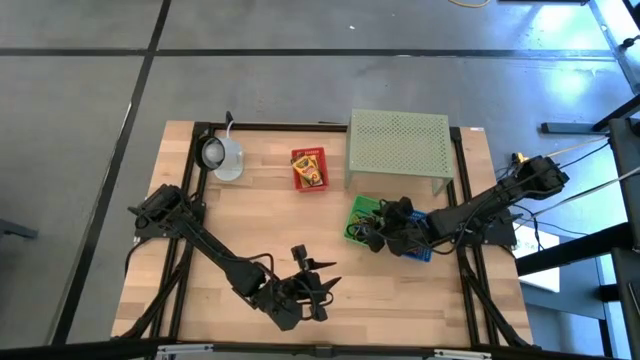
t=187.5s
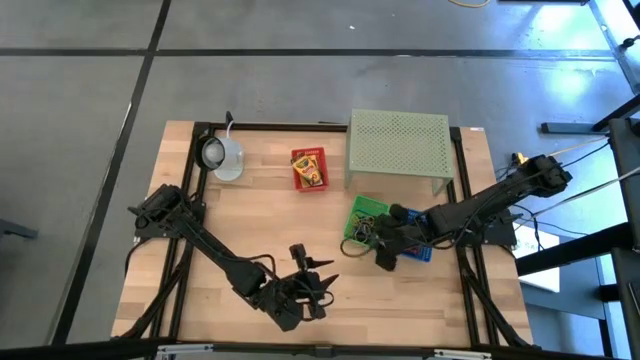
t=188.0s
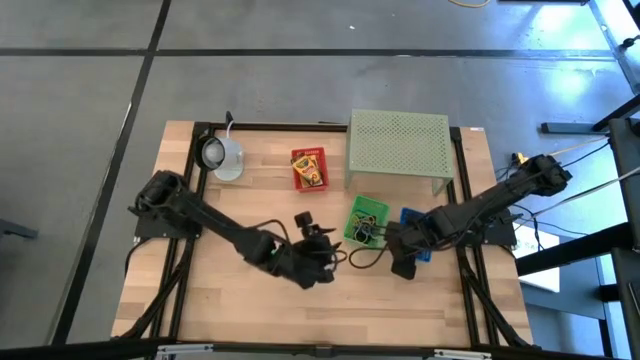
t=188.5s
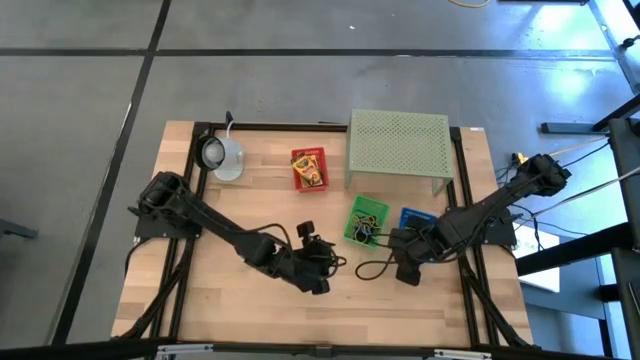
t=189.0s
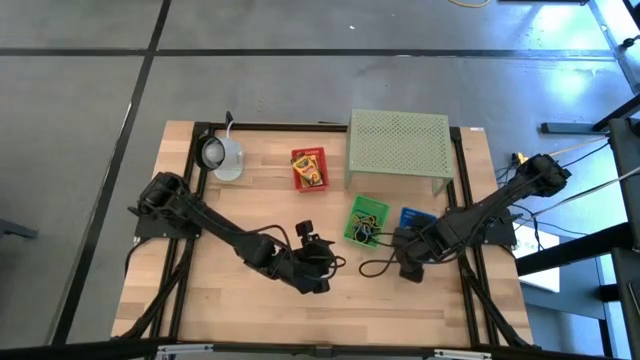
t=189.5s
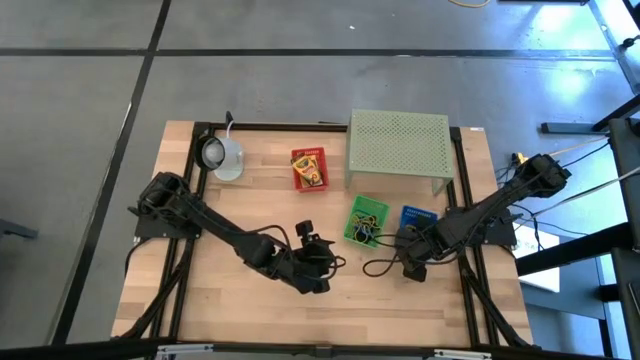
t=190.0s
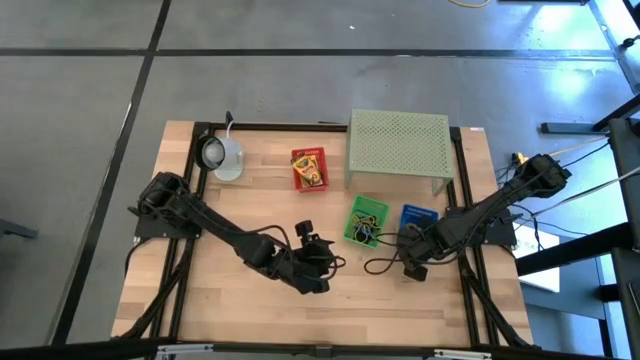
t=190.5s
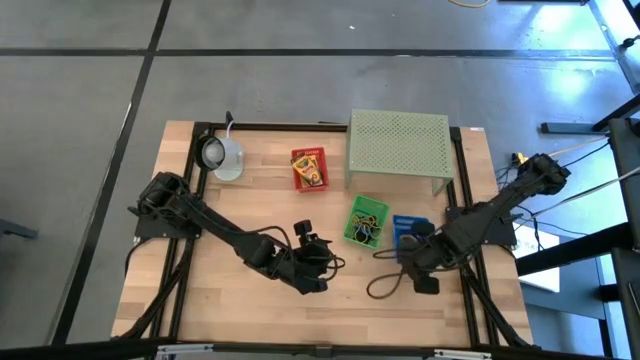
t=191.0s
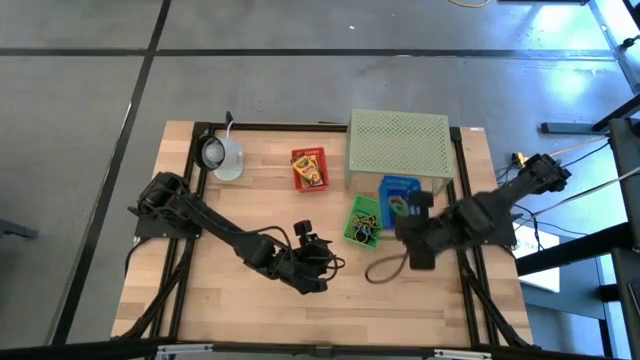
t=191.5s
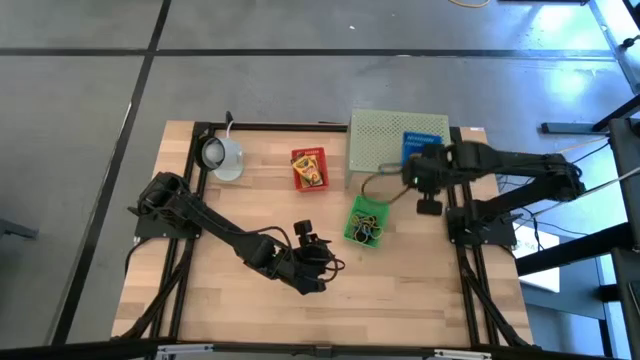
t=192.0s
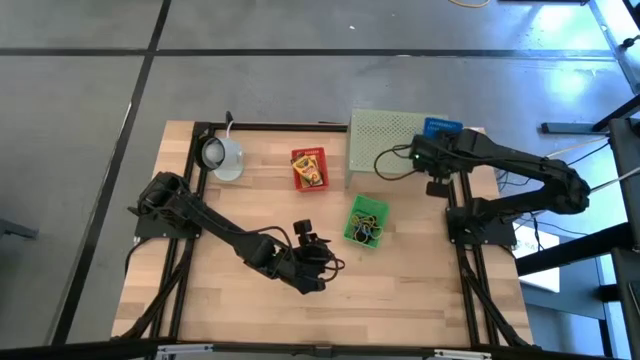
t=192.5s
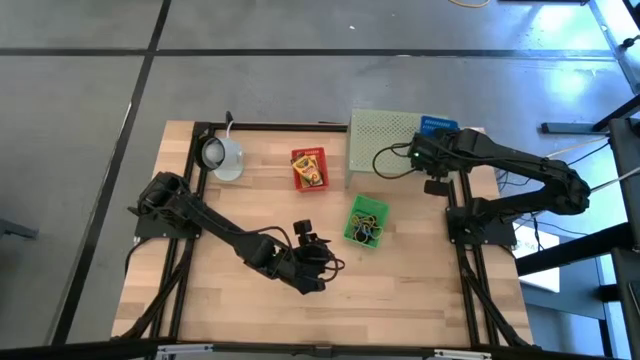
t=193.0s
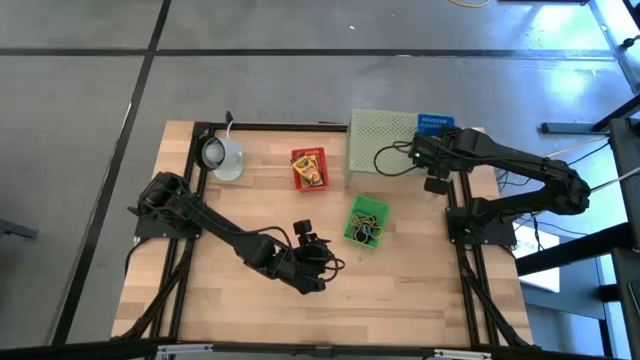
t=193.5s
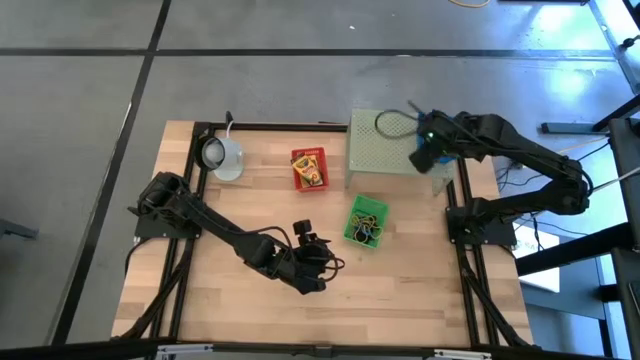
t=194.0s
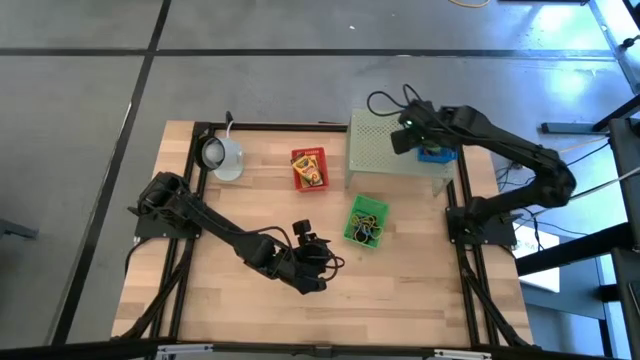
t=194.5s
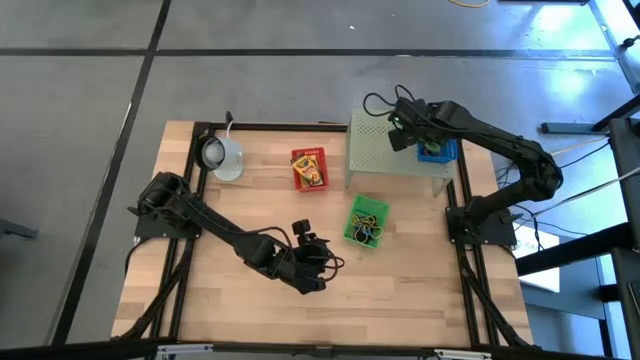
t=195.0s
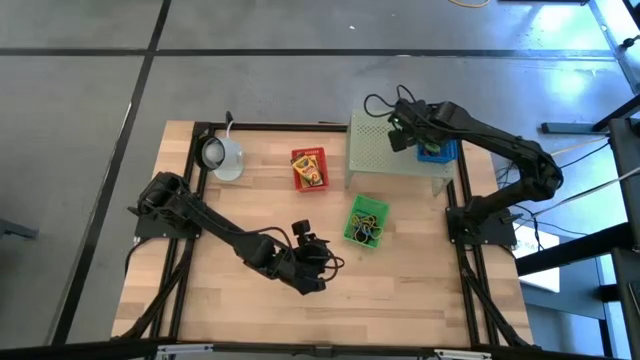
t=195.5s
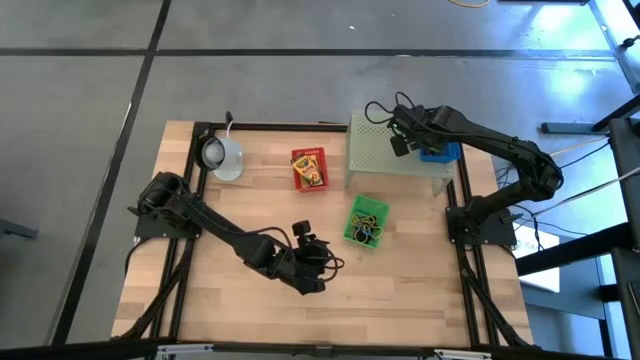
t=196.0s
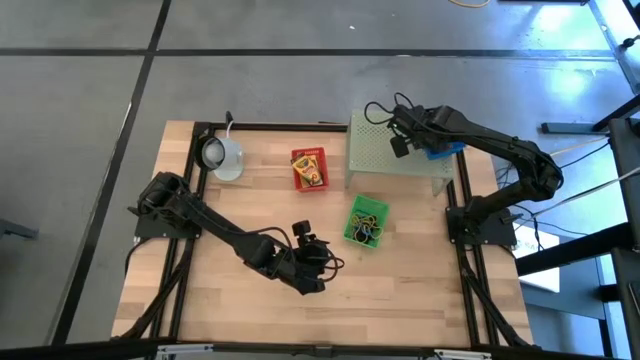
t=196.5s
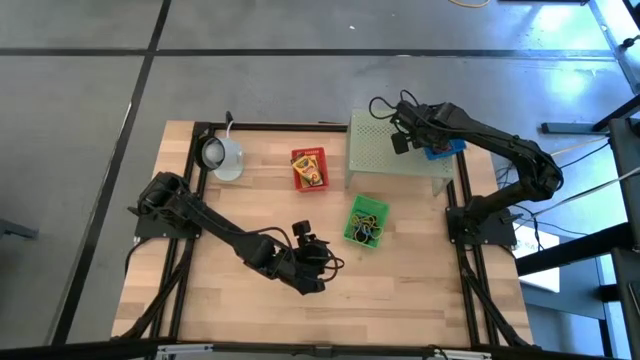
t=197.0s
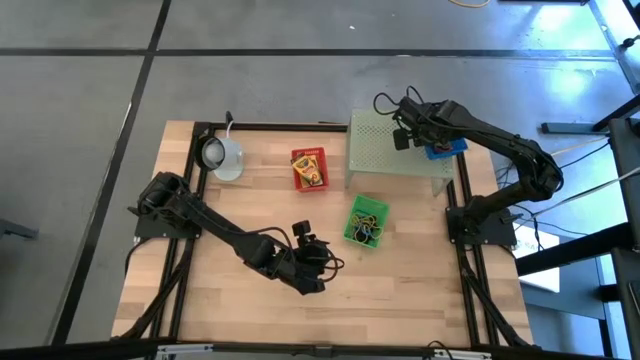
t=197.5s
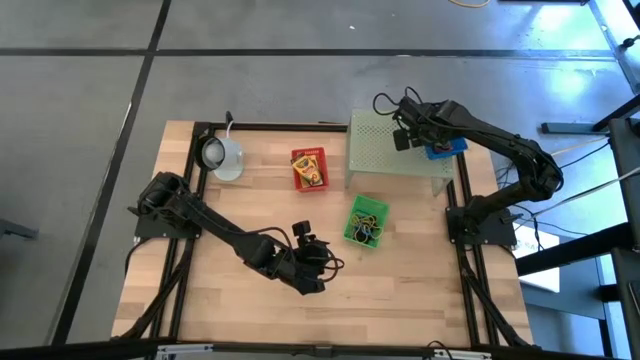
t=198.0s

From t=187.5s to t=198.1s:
Task: Pick & Place Office Desk Supplies
Put the blue bin with the sorted spring keychains on the shelf

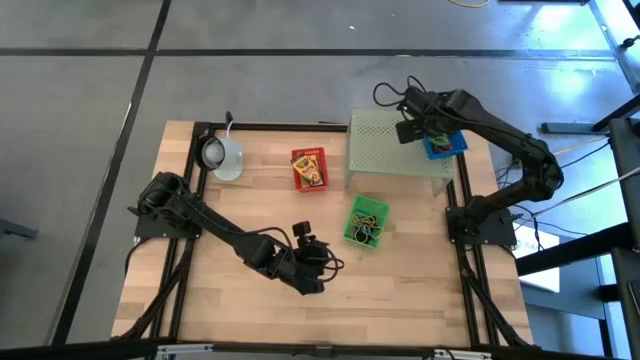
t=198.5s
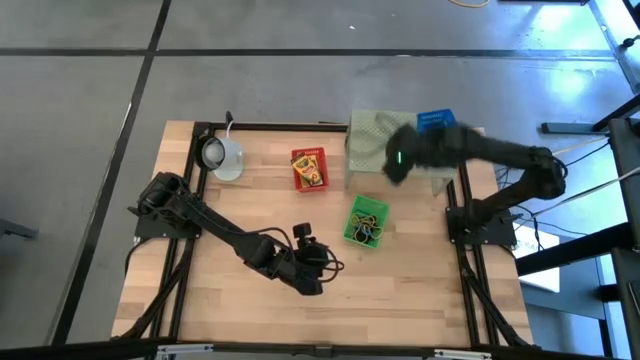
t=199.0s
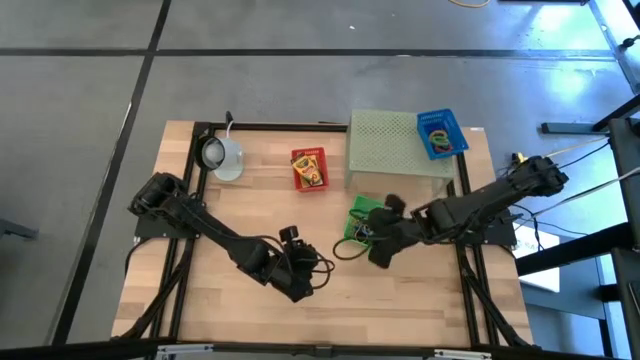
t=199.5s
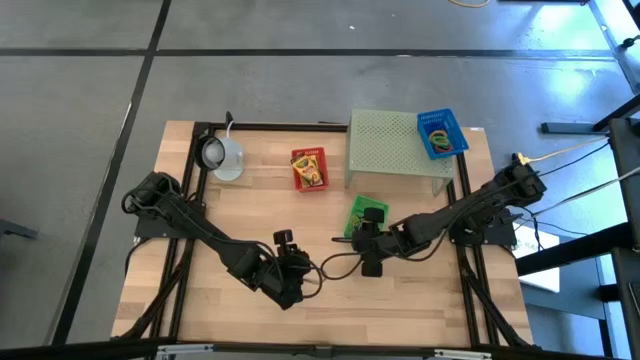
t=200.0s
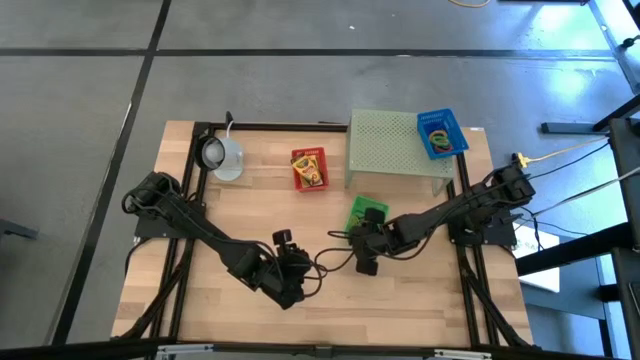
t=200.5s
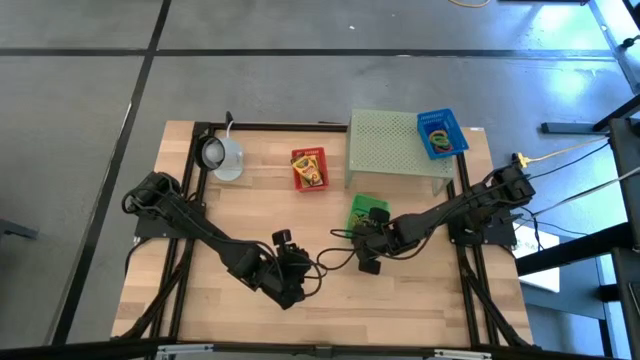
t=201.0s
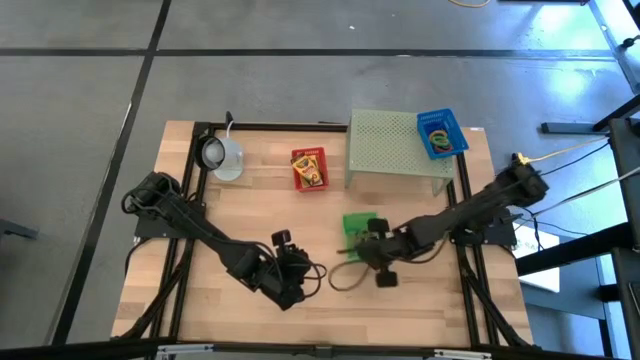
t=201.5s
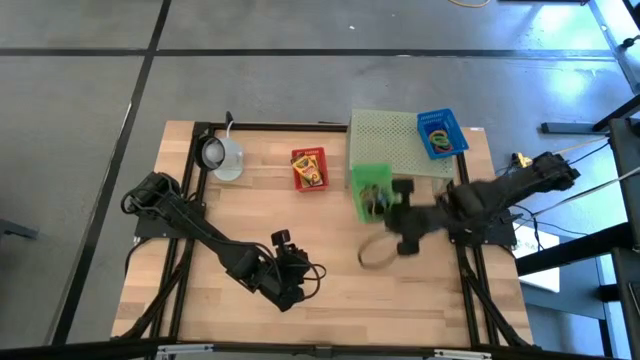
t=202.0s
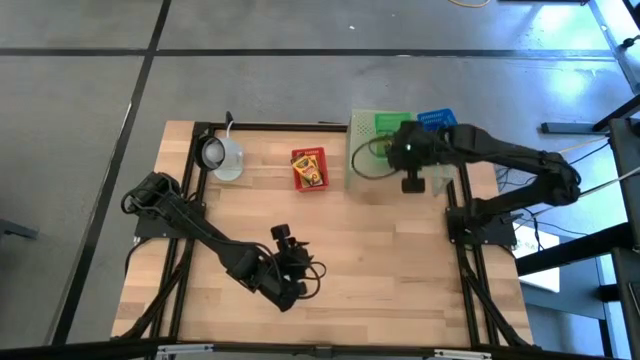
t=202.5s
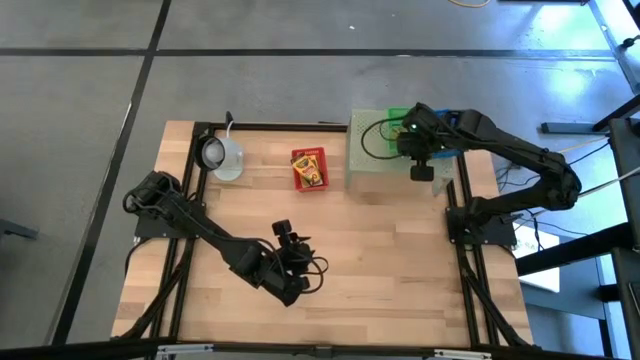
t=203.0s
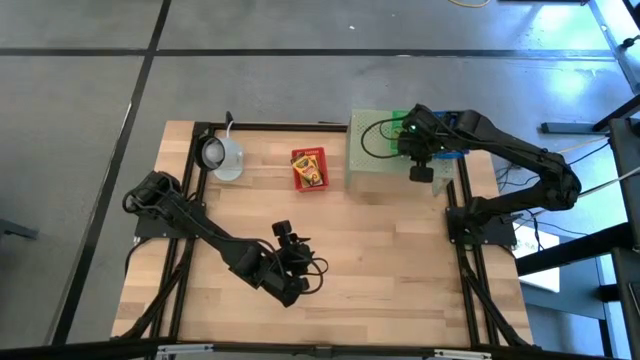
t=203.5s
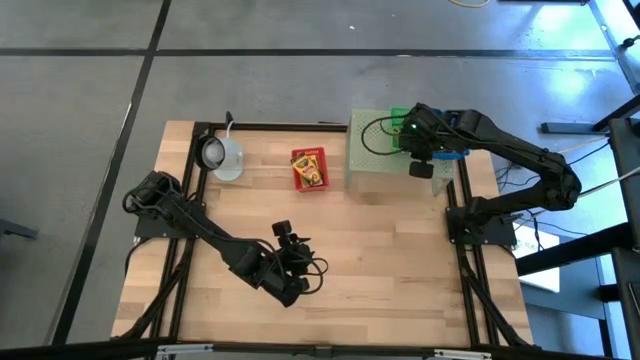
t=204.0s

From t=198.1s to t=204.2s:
Put the green bin with the sorted rubber bands on the shelf

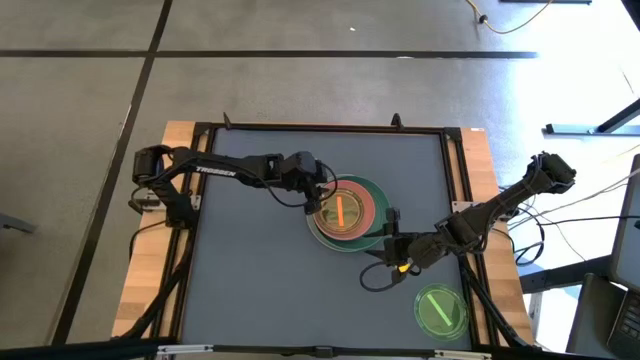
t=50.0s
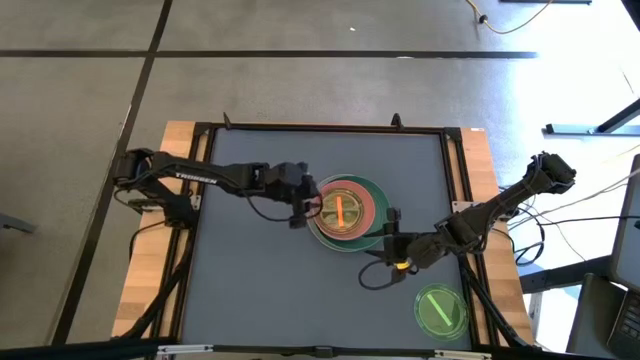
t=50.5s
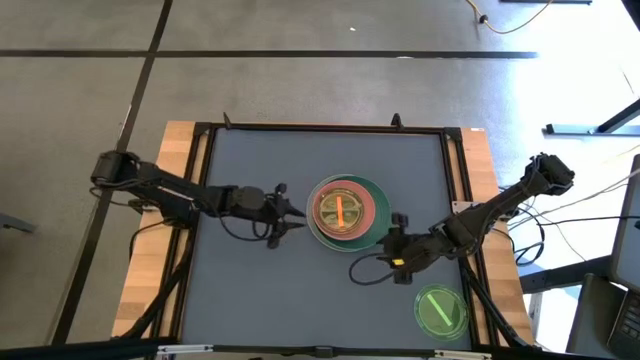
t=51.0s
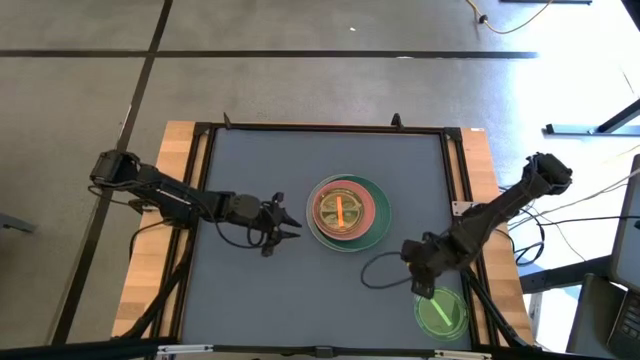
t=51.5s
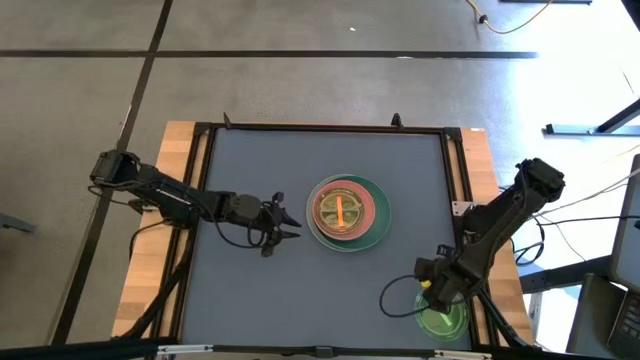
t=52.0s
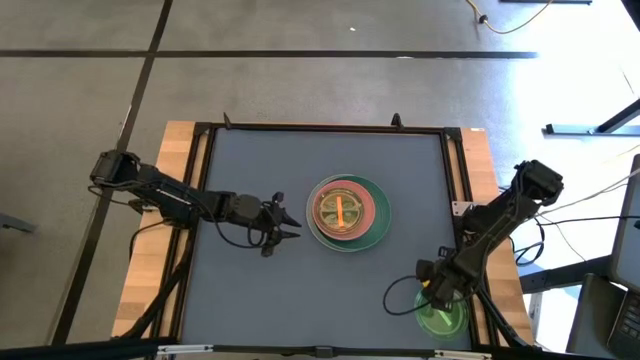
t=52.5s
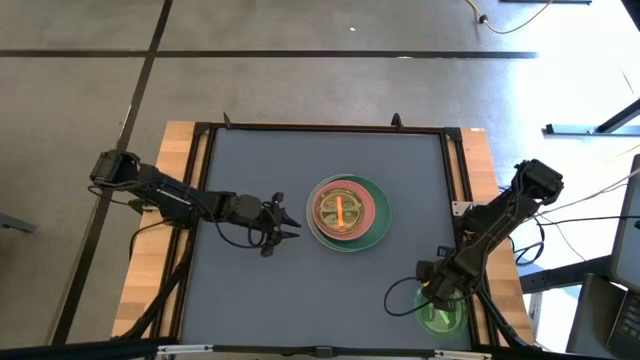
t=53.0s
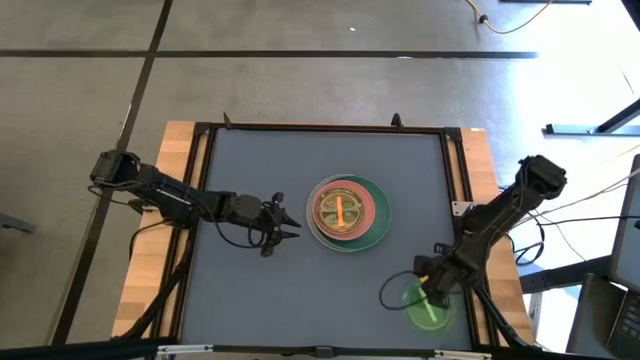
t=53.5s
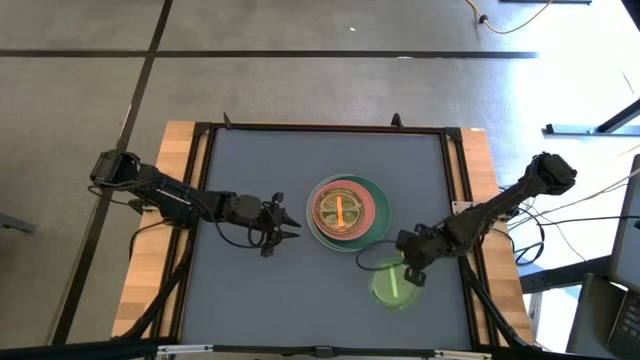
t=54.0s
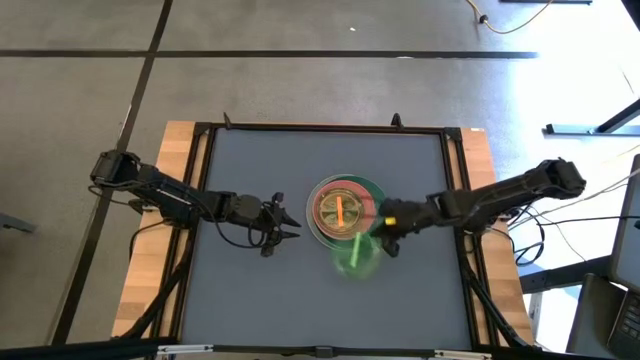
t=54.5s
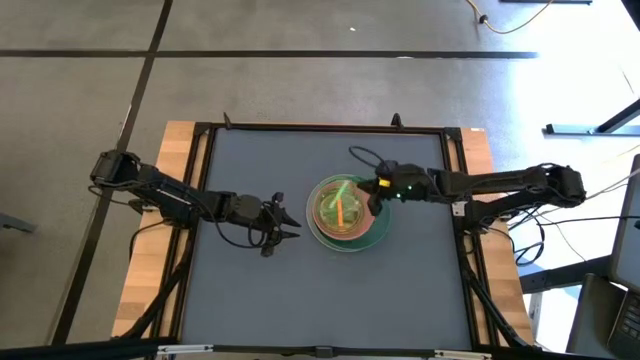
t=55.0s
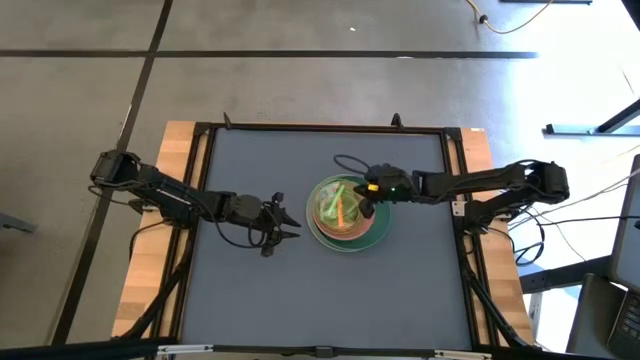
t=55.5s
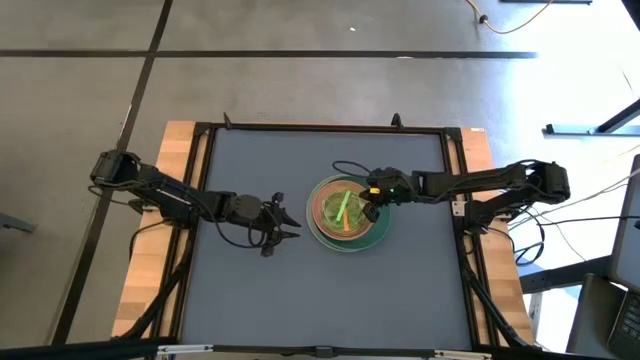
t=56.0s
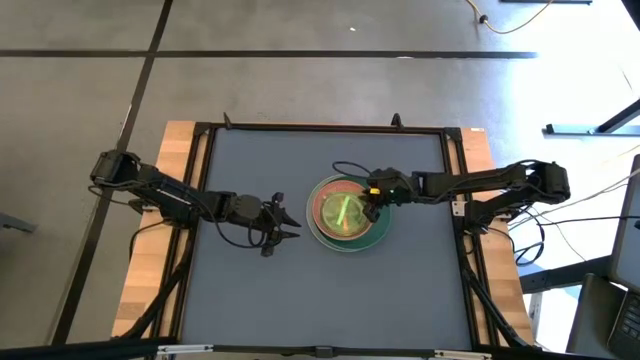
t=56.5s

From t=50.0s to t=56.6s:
Task: Stack plastic plates
Stack the transparent green plate on top of the transparent orange plate
